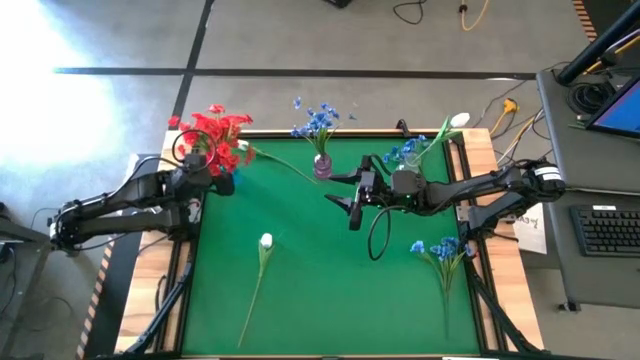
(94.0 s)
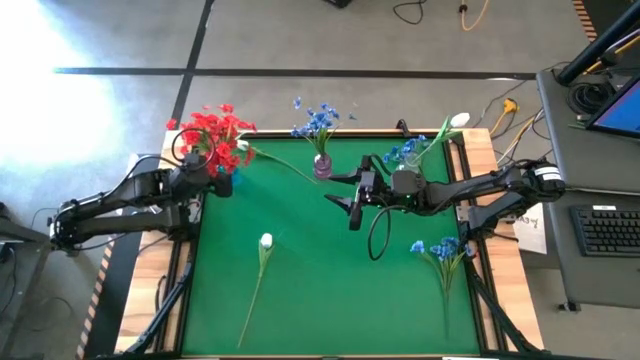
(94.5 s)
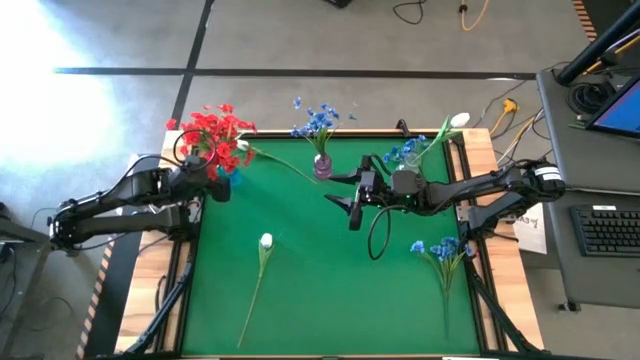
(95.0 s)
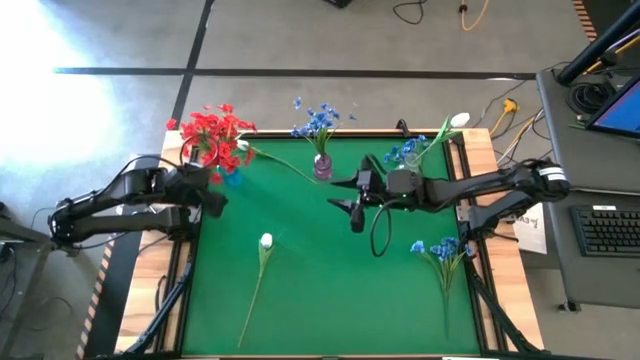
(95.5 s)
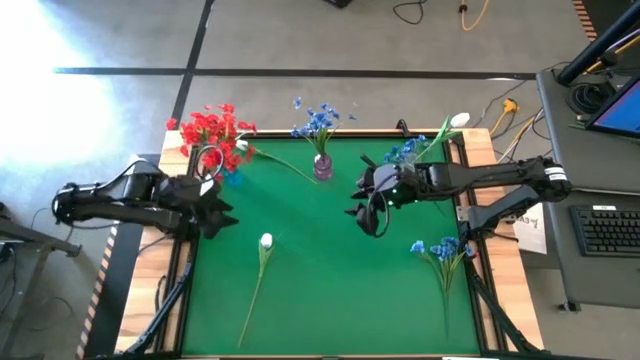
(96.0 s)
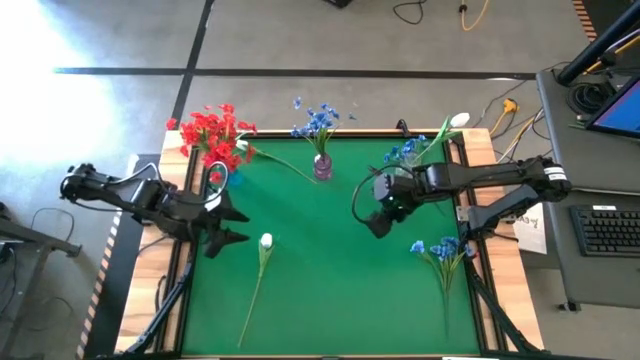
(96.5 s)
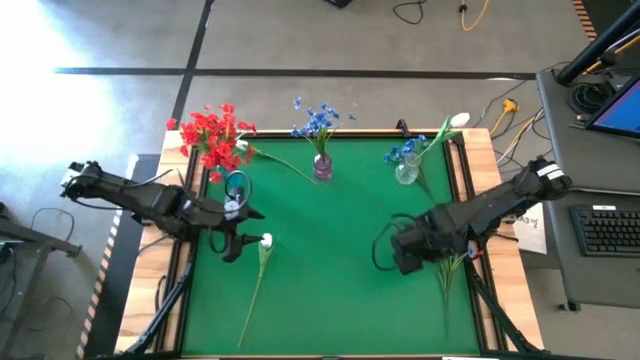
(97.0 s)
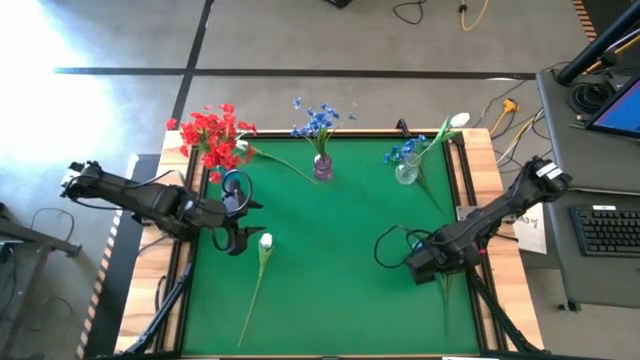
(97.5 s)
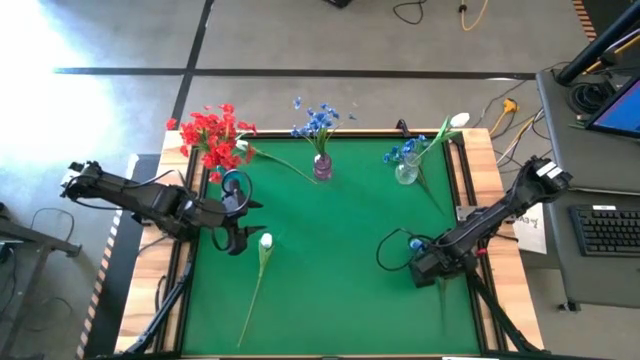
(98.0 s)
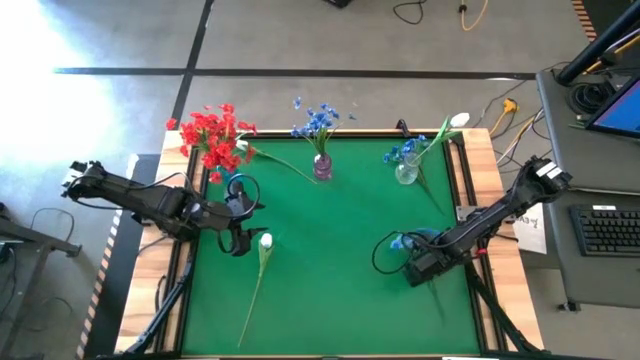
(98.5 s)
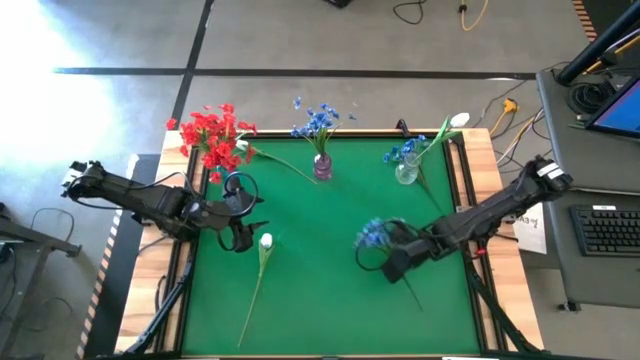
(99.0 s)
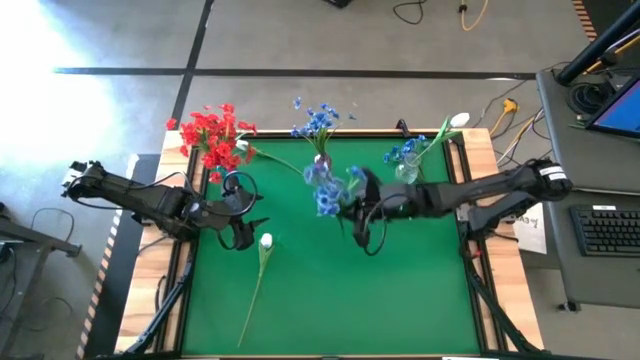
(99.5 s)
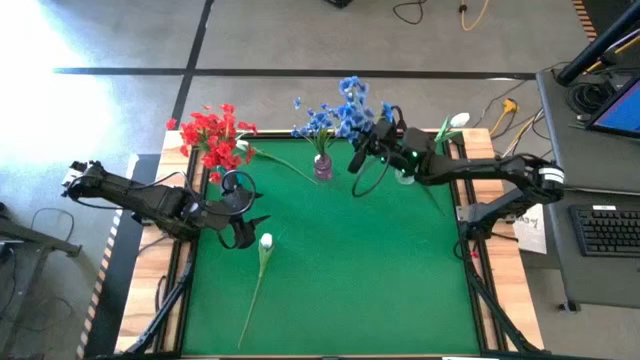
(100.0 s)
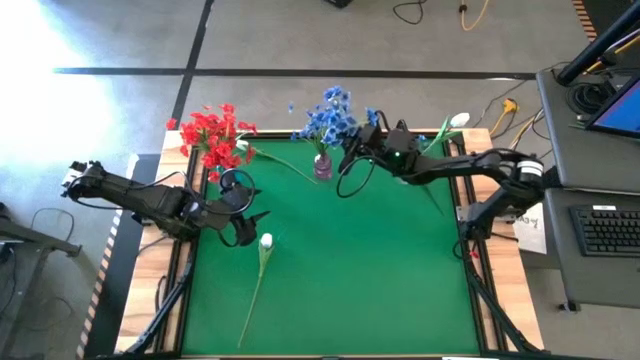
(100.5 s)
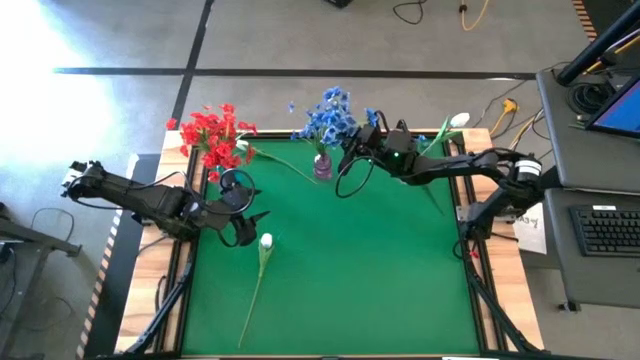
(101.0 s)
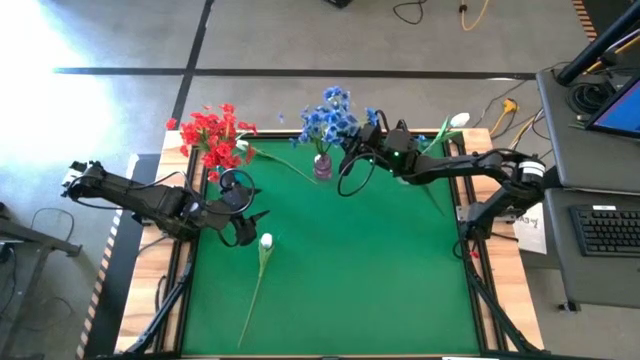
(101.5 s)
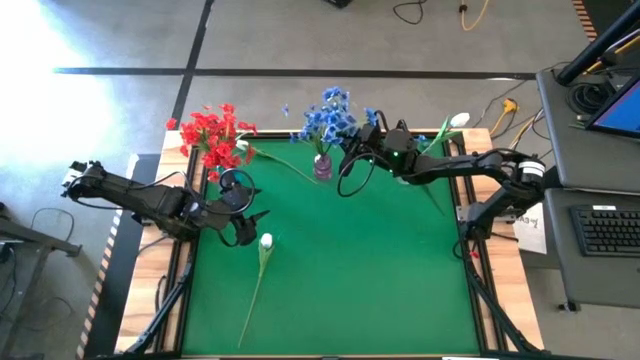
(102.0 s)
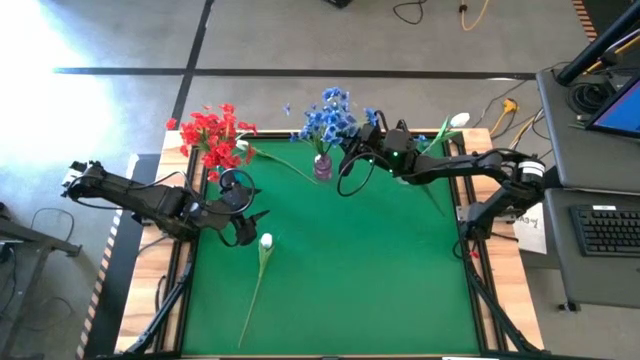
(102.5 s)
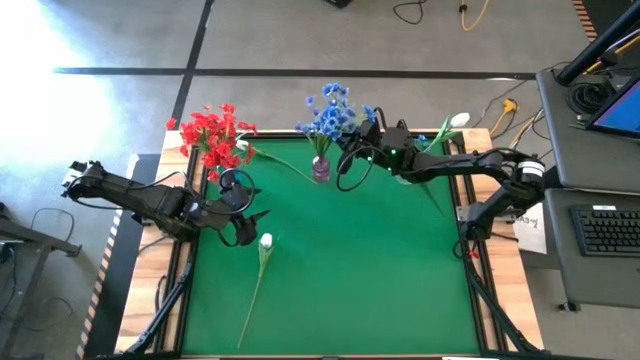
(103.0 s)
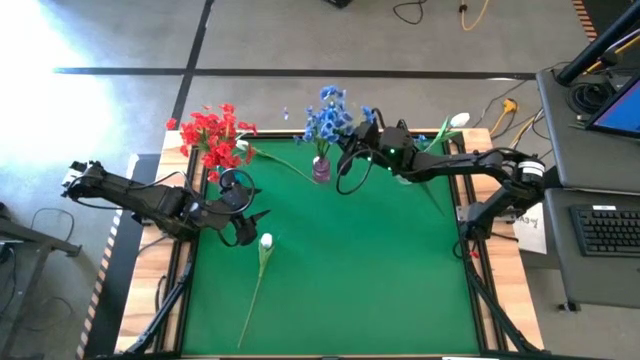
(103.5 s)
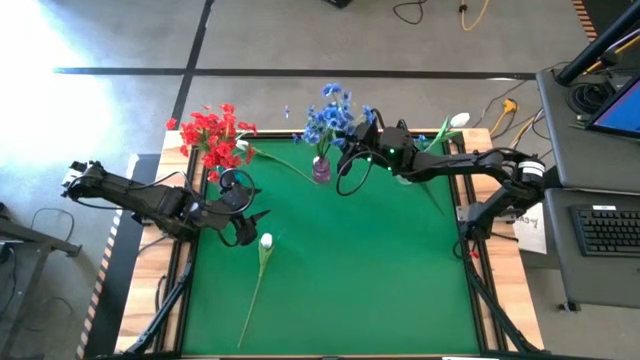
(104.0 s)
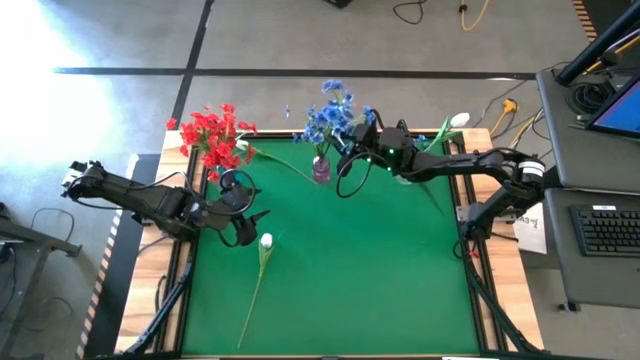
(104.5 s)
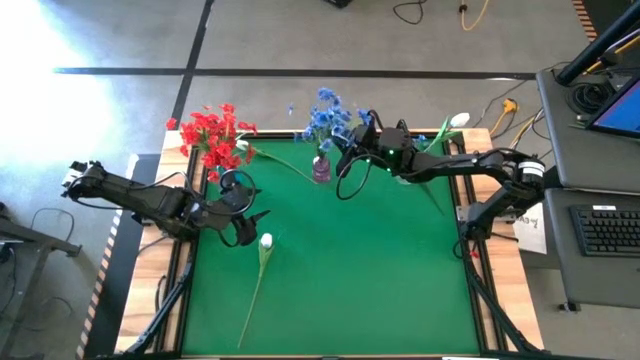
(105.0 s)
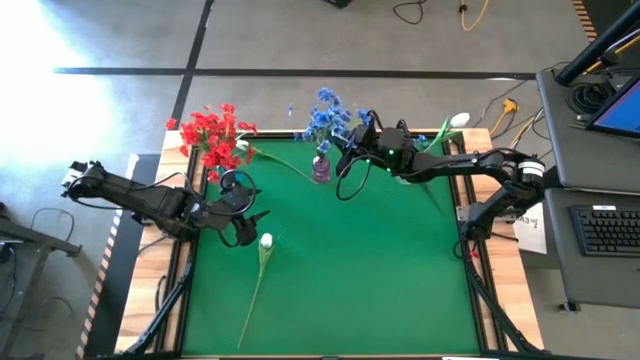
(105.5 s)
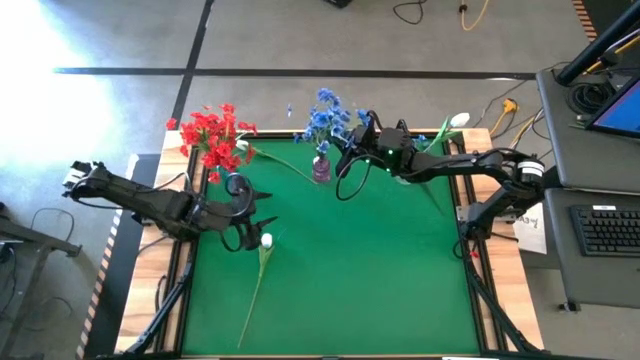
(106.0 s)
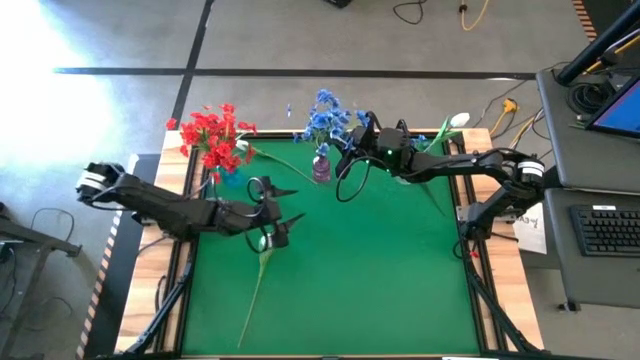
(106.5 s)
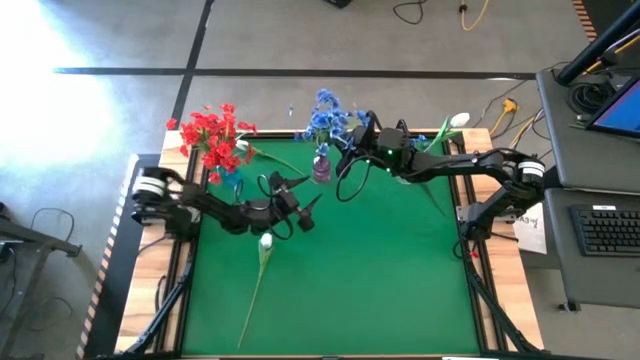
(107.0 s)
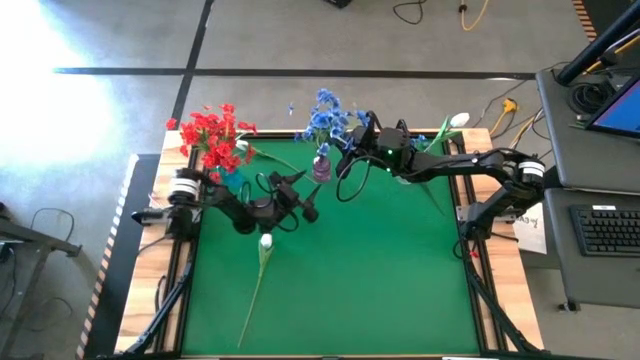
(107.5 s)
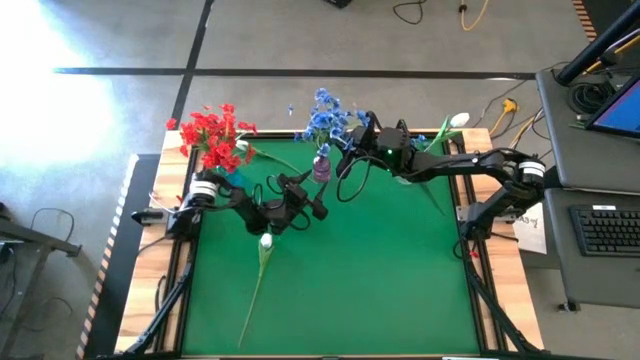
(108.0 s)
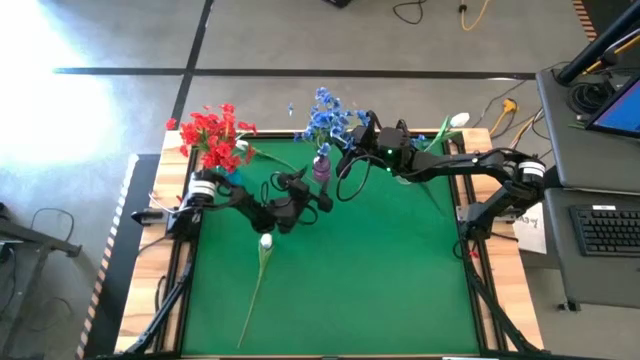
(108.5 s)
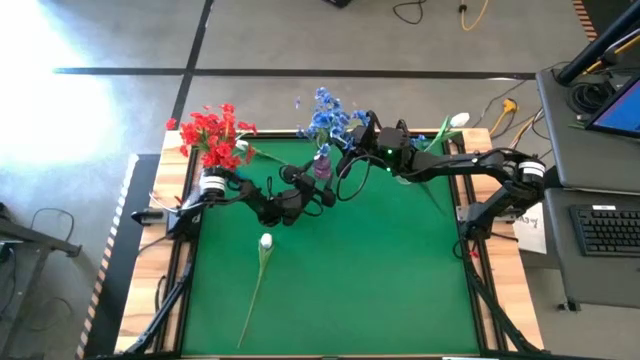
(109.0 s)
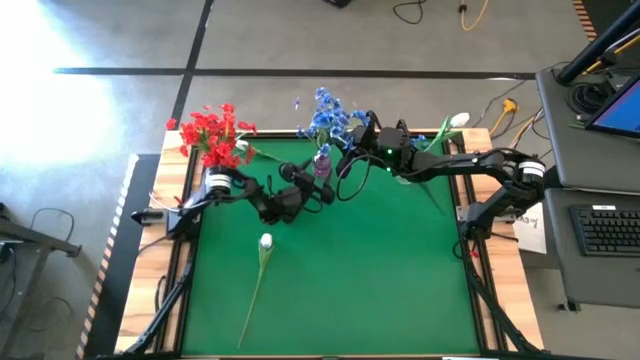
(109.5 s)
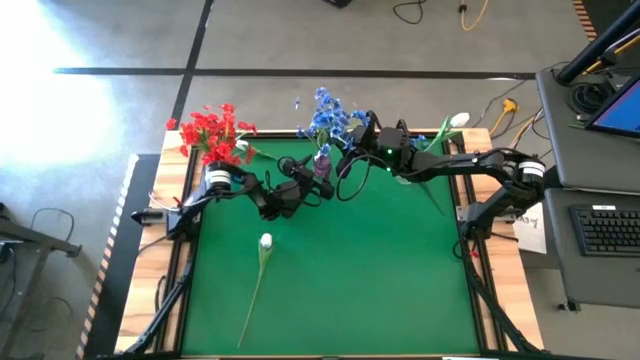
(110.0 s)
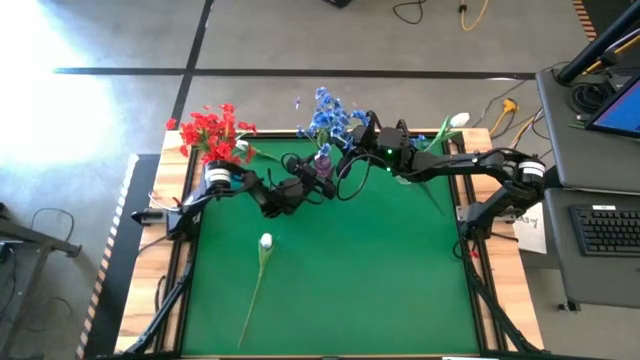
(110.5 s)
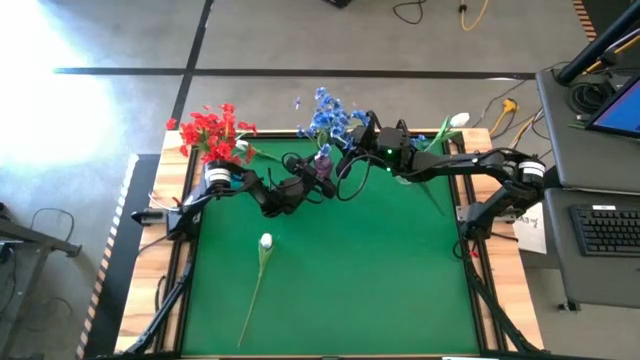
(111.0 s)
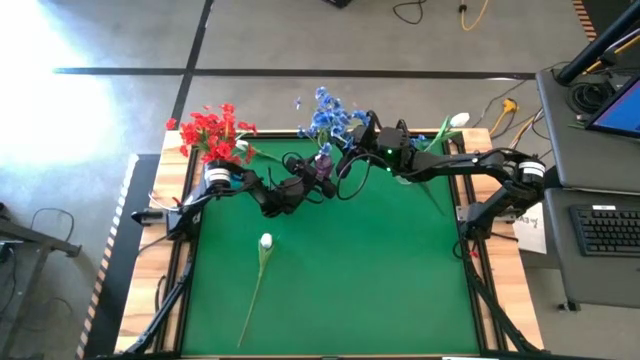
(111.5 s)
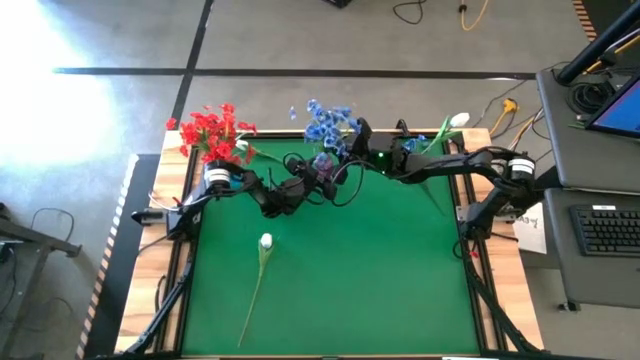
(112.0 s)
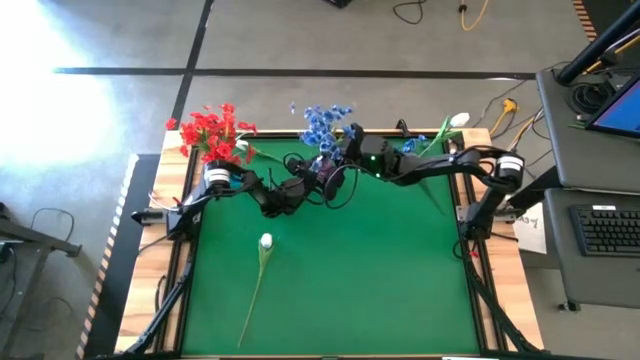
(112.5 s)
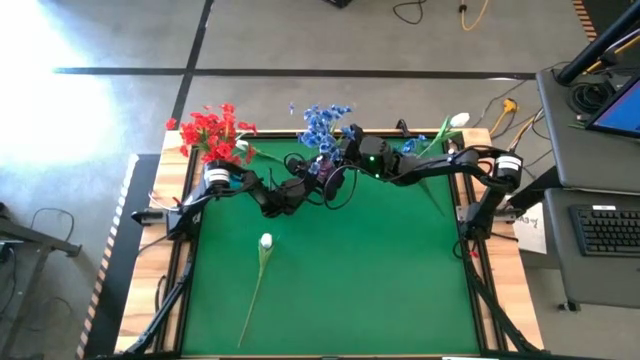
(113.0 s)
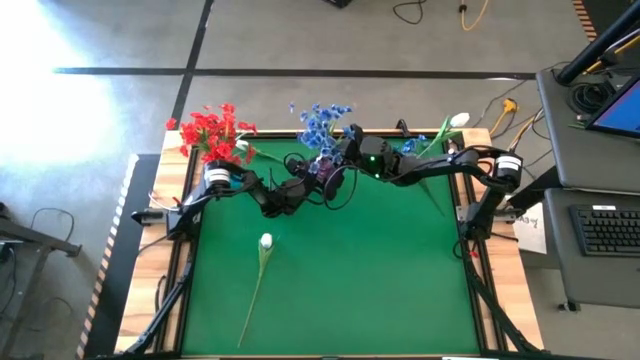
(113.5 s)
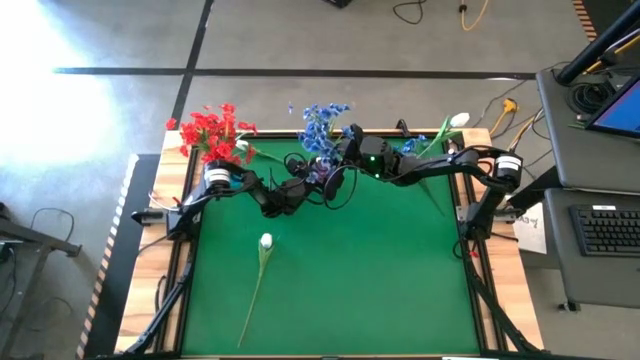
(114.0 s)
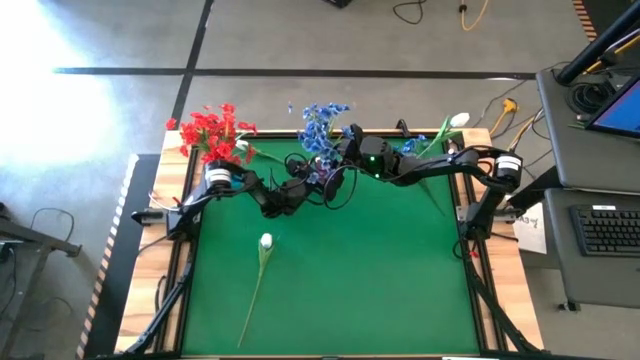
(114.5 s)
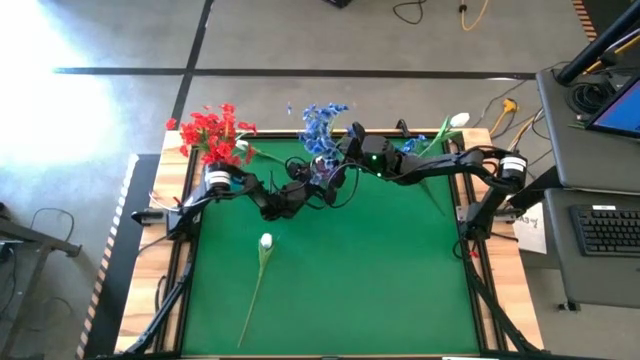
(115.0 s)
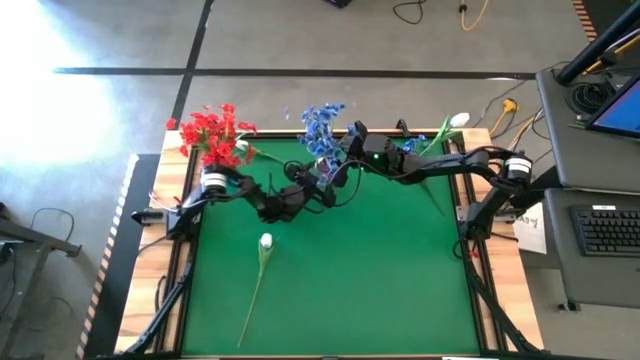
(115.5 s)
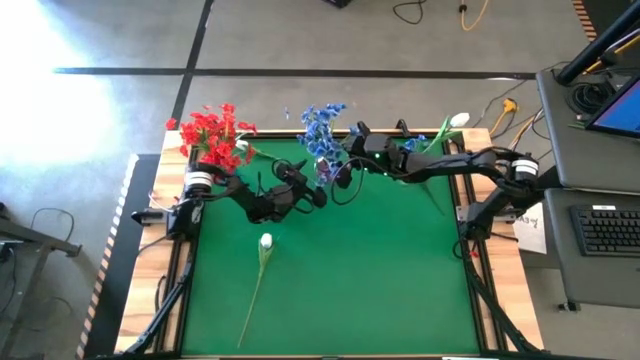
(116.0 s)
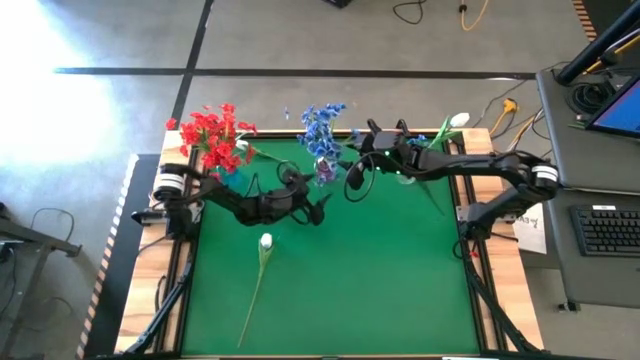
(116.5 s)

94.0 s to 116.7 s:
Task: Sort flowers into vase by color
Put the bottom blue flowers into the purple vase
